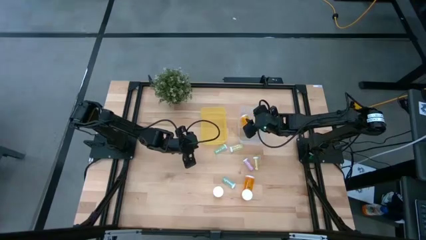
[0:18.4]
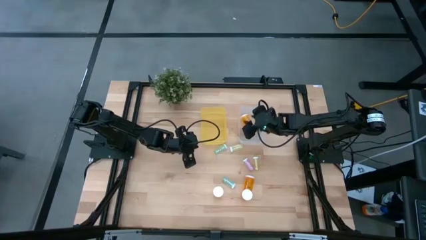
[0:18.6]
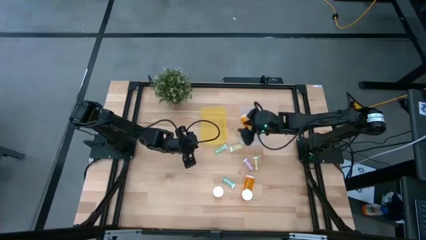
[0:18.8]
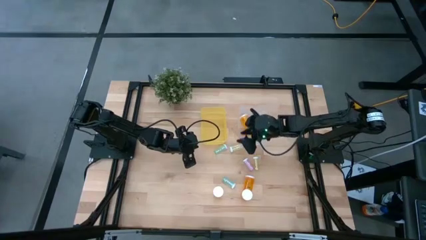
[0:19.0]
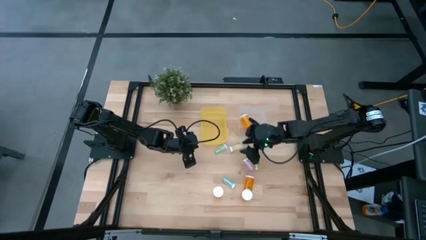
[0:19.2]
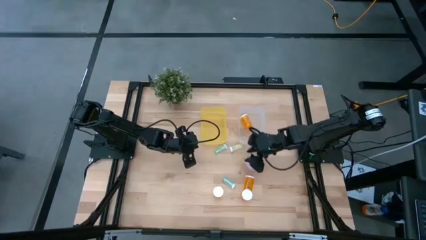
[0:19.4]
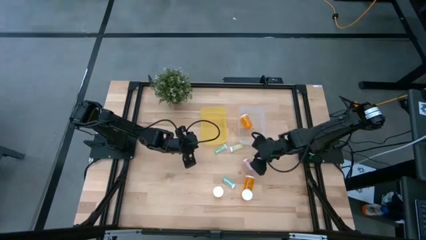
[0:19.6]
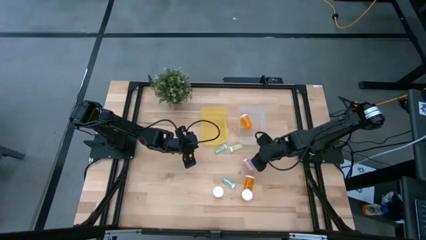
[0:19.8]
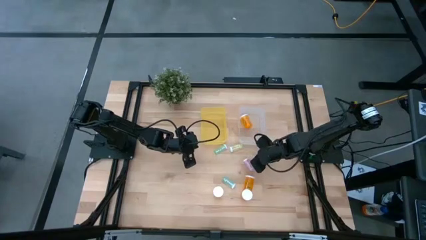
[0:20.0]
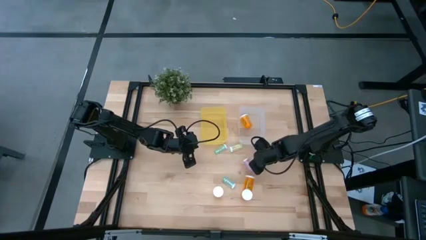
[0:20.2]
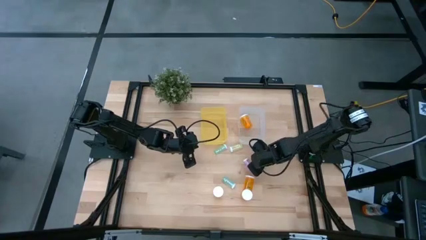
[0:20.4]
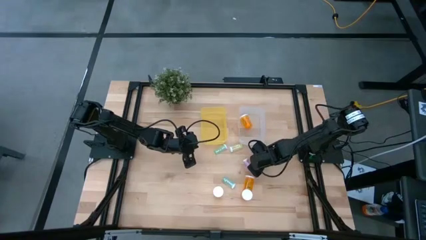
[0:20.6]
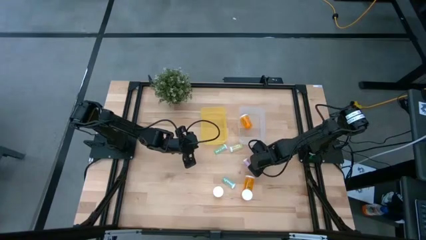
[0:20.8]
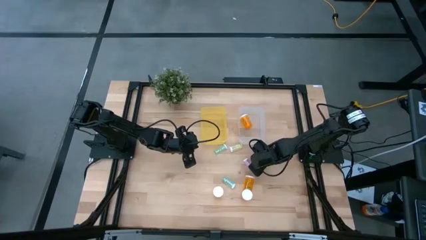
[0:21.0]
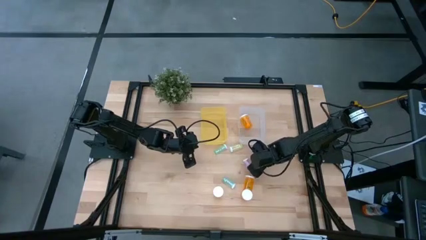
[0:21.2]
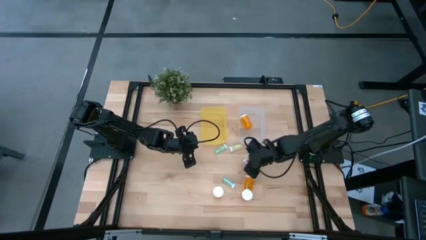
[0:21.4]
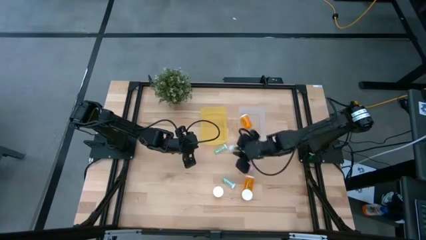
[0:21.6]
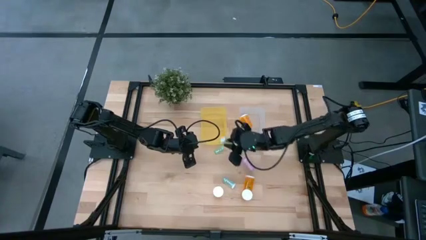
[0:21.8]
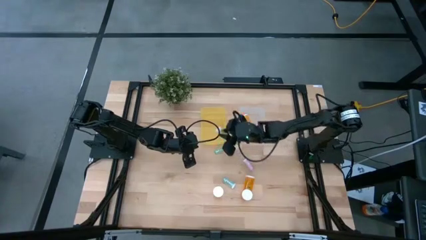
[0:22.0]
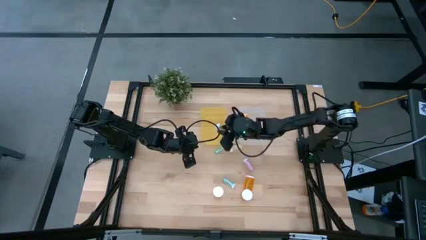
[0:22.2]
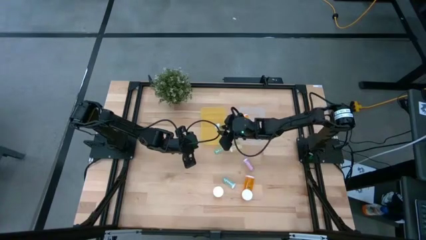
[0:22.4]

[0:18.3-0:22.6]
Task: Pick and place medicine bottles into bin by pill shape (circle, oval)
Put the small yellow pill bottle into the yellow bin

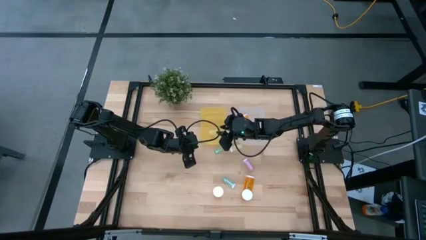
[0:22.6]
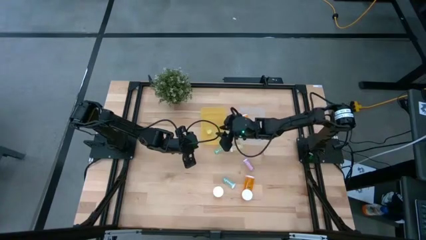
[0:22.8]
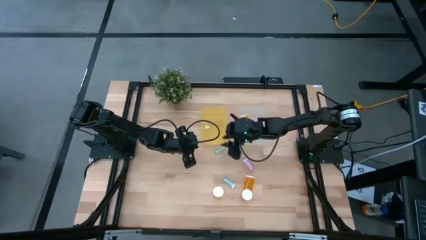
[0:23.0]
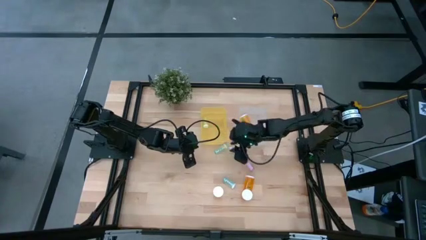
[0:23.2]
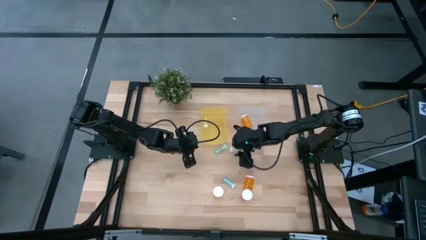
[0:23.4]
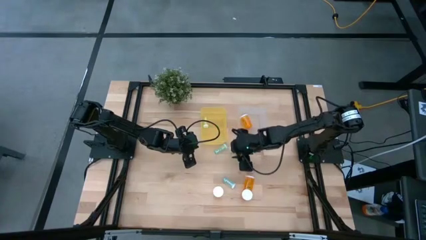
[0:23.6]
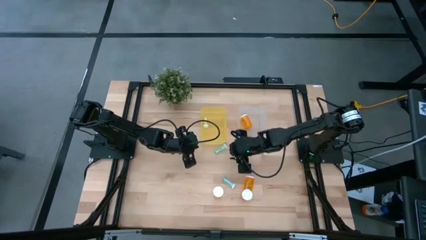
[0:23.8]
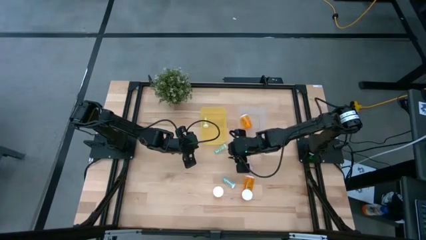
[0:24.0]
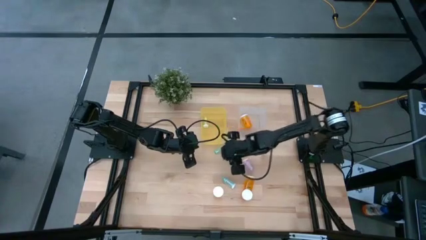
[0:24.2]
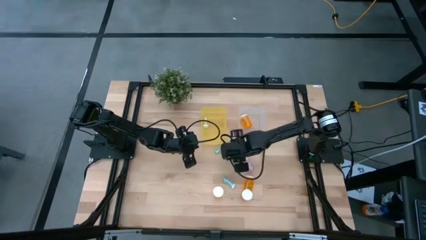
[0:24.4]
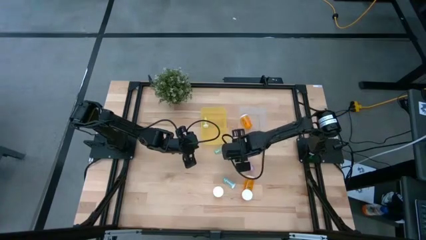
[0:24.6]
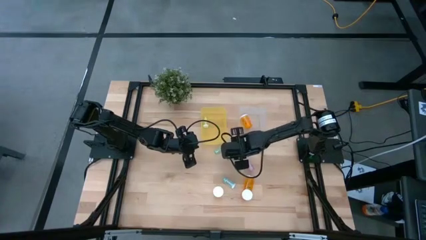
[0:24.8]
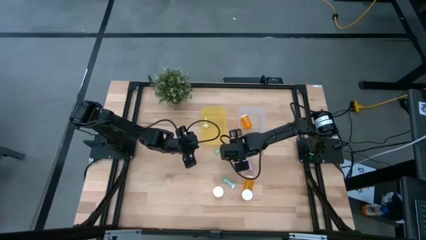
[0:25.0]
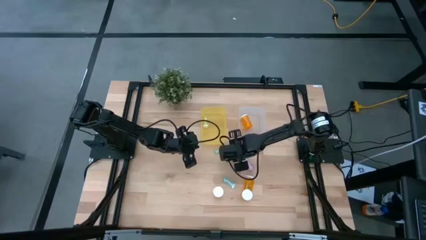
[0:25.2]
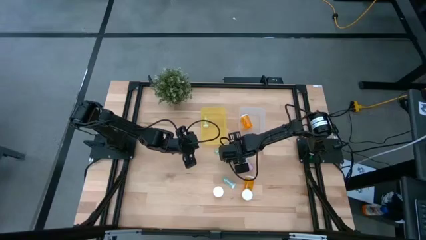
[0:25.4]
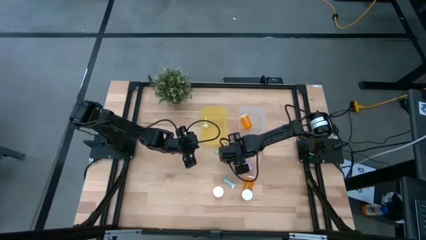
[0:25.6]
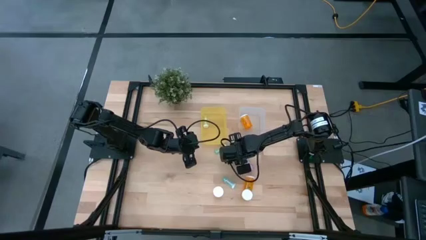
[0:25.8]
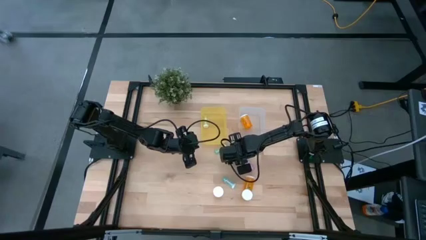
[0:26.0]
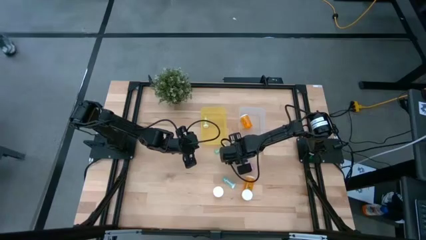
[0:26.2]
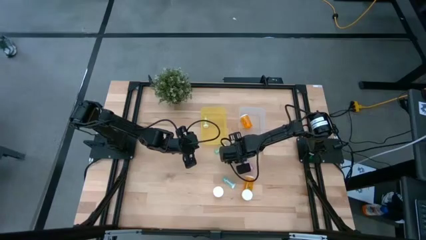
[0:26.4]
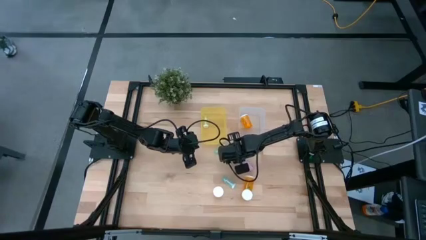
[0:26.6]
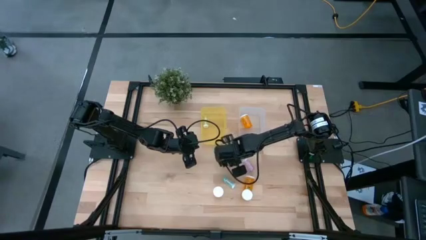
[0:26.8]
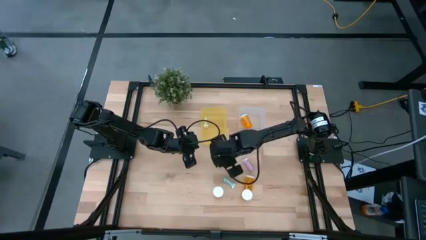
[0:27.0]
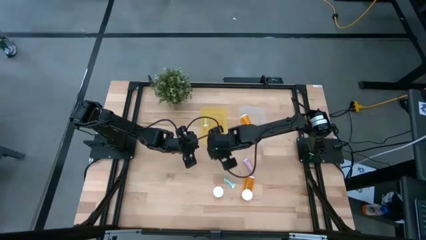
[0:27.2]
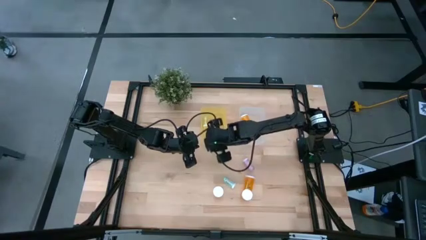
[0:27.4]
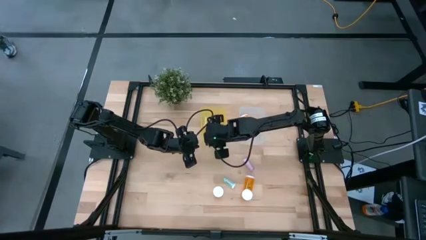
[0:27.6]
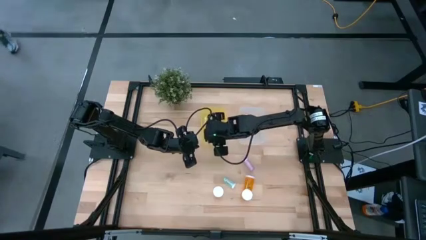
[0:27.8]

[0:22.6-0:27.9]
Put the small yellow pill bottle into the yellow bin

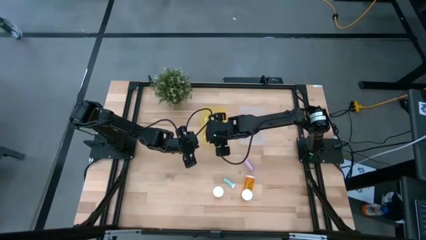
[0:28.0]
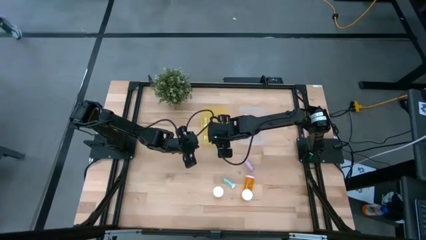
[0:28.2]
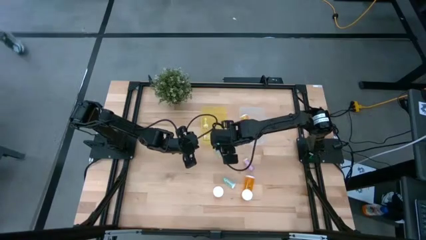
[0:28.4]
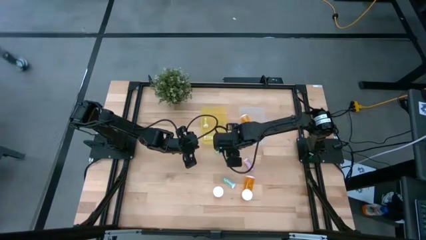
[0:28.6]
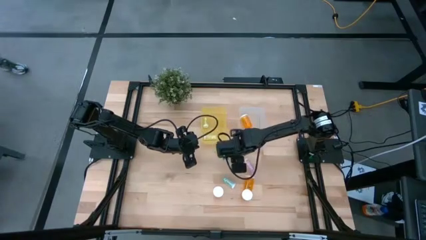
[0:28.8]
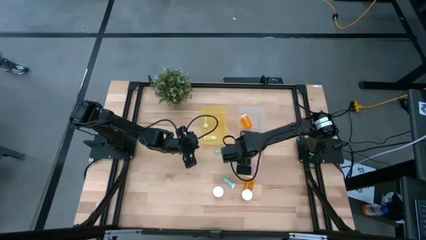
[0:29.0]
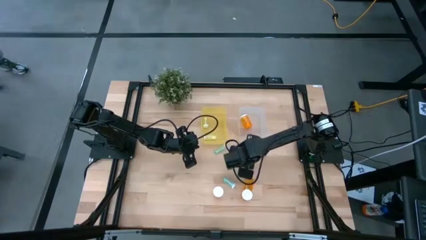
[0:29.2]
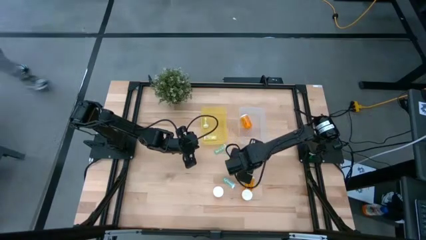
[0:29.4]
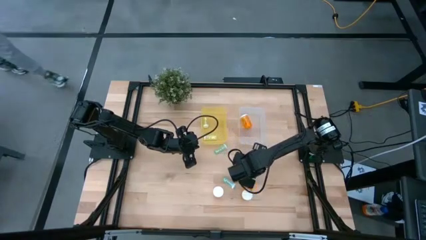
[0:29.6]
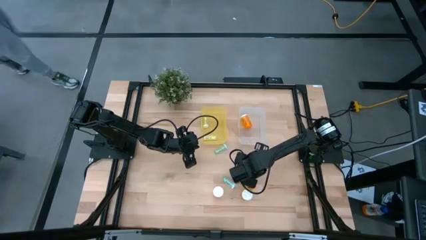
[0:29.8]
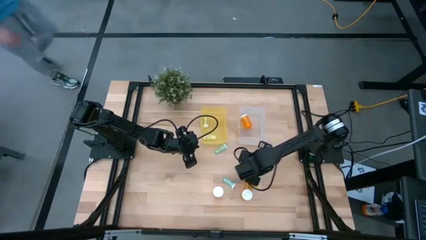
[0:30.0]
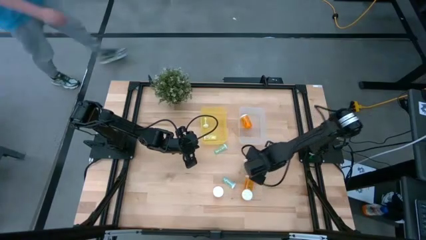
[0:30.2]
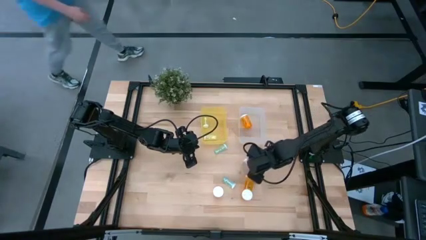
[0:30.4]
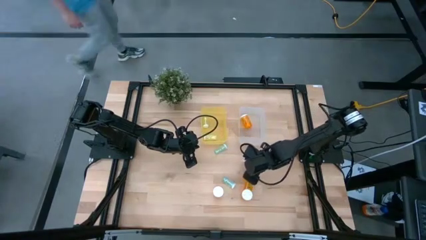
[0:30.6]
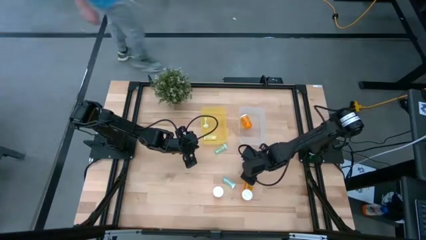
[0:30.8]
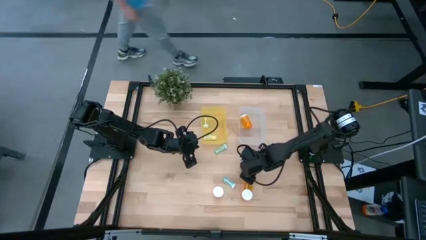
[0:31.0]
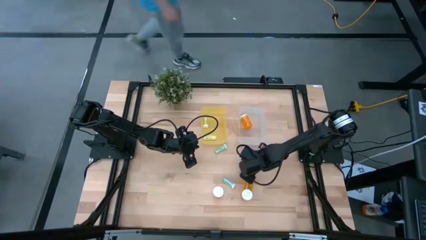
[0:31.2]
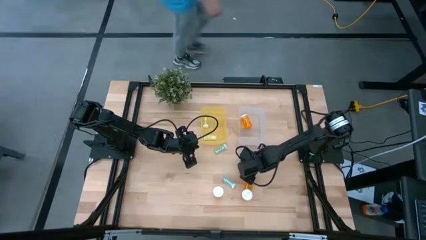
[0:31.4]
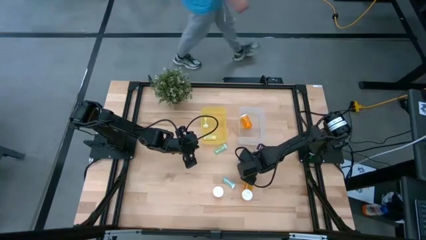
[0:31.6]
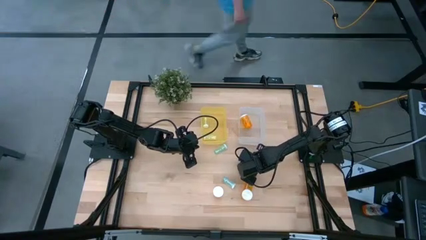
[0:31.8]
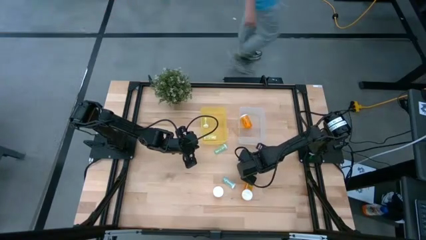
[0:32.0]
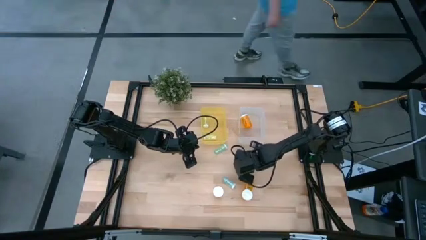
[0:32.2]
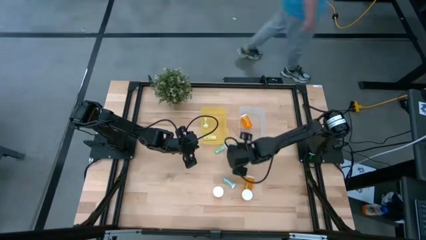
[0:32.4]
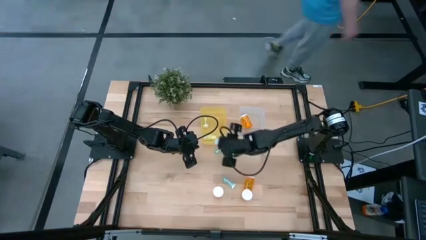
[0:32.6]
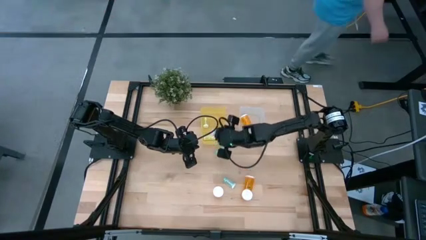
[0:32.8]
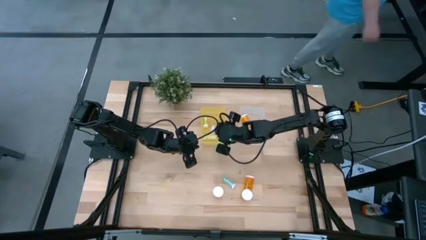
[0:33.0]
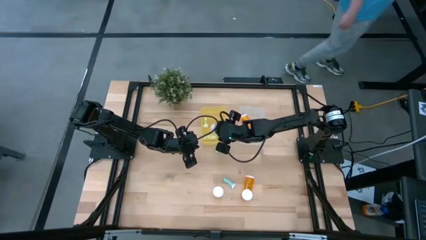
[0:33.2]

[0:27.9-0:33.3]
Put the small pink pill bottle into the yellow bin

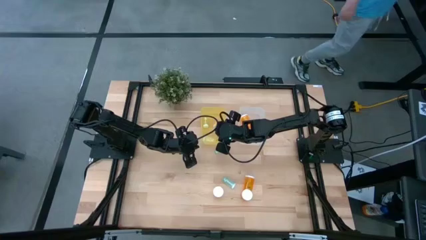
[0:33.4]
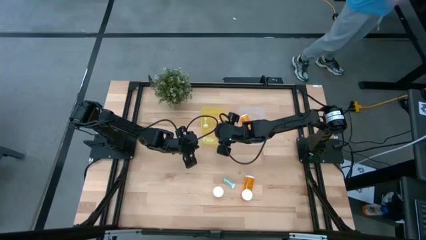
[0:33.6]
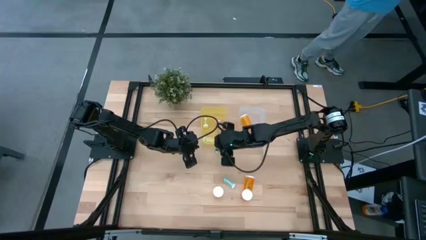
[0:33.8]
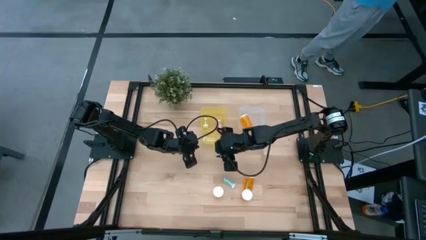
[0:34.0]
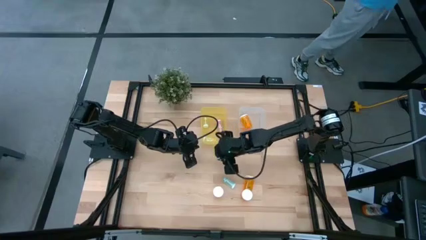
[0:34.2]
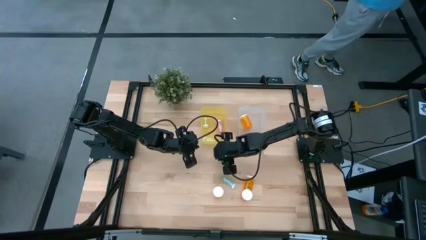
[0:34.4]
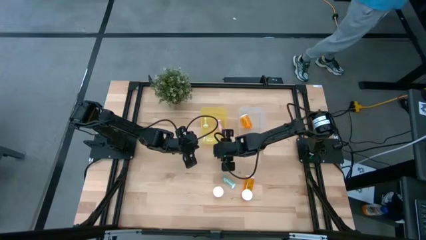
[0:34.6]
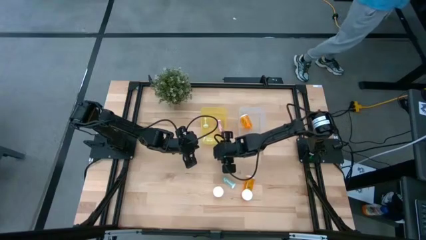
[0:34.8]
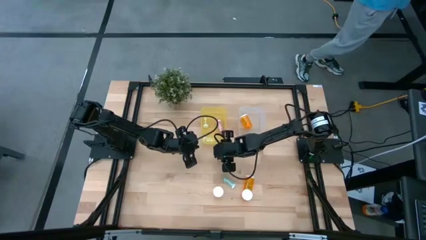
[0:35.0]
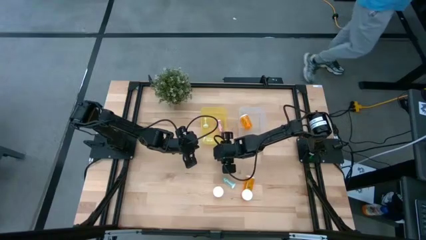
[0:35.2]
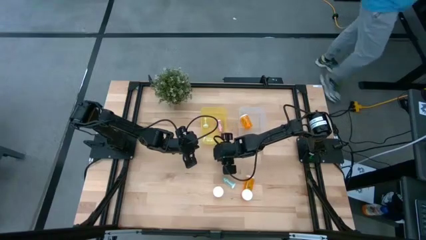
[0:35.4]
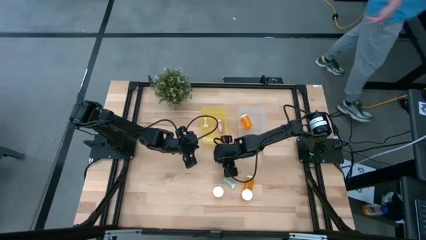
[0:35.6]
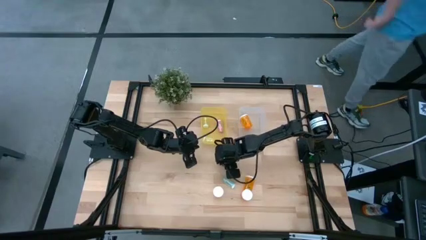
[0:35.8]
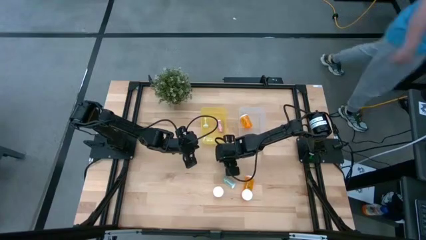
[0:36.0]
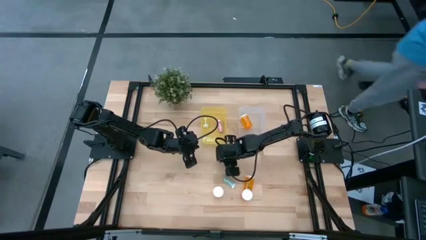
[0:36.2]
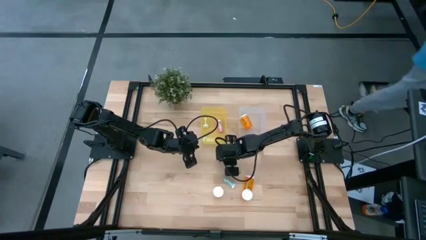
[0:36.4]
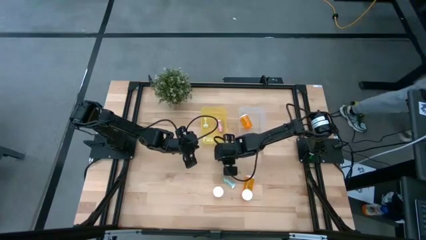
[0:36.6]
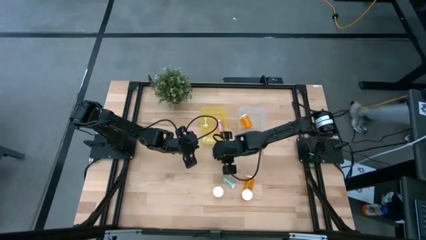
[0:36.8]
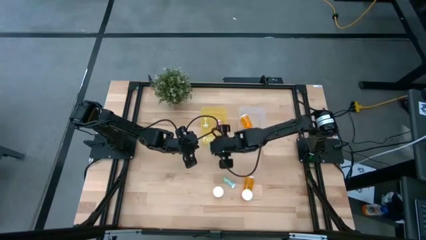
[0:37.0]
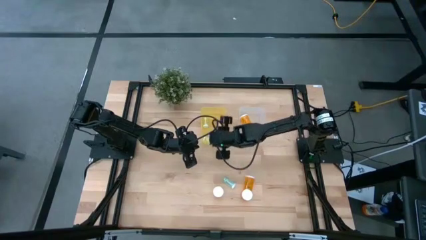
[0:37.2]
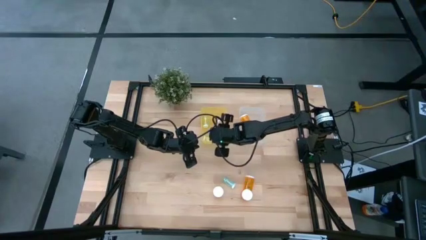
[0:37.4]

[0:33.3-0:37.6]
Put the small blue pill bottle into the yellow bin
